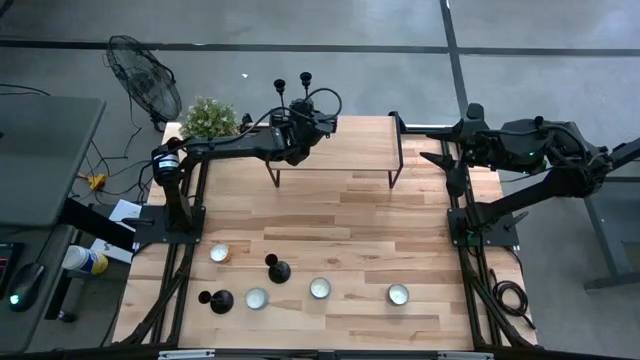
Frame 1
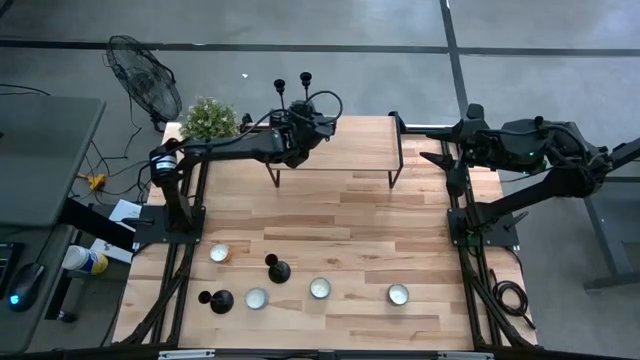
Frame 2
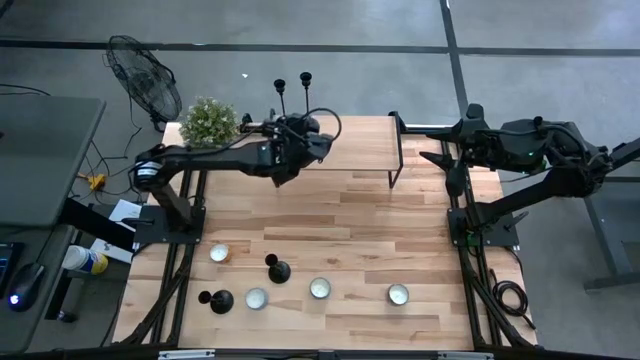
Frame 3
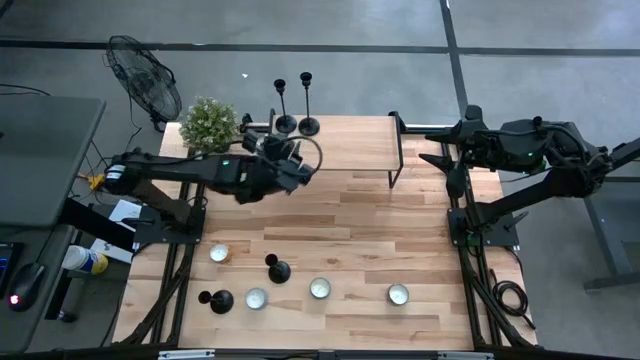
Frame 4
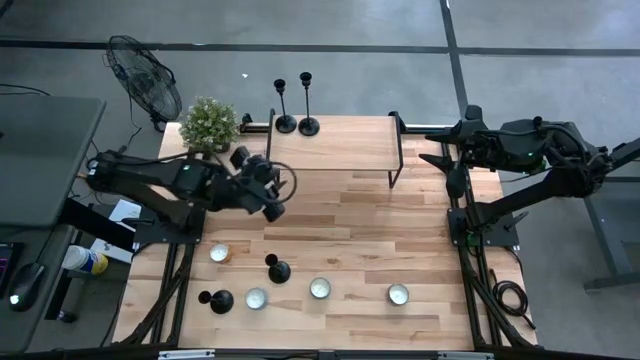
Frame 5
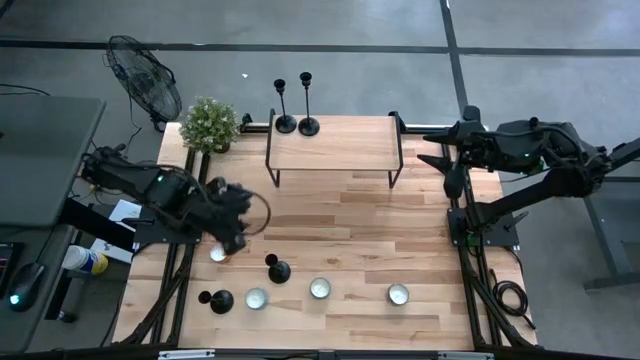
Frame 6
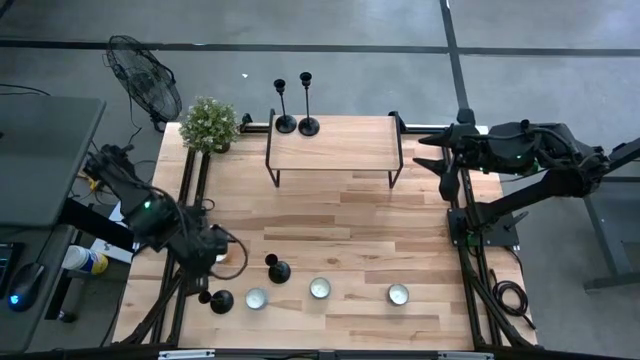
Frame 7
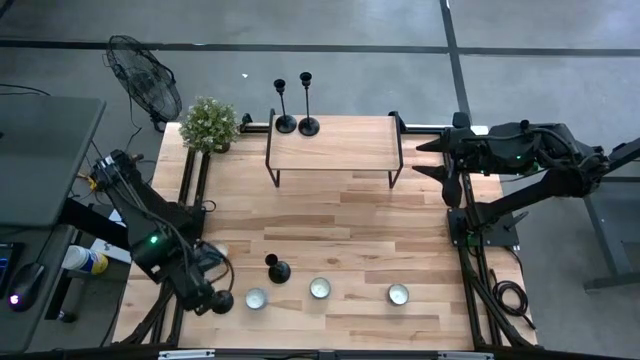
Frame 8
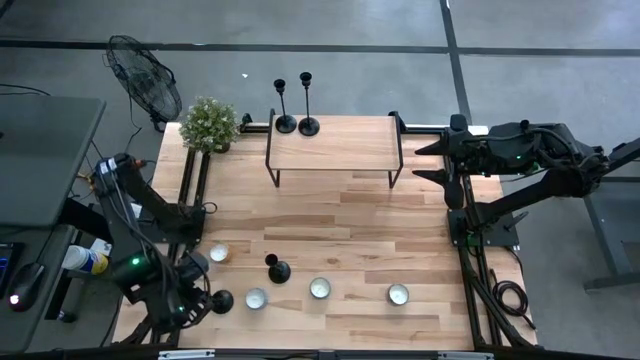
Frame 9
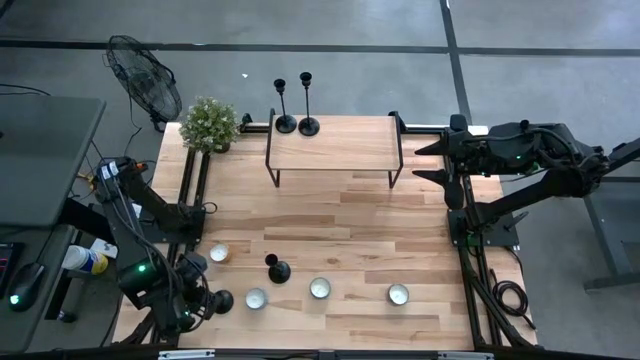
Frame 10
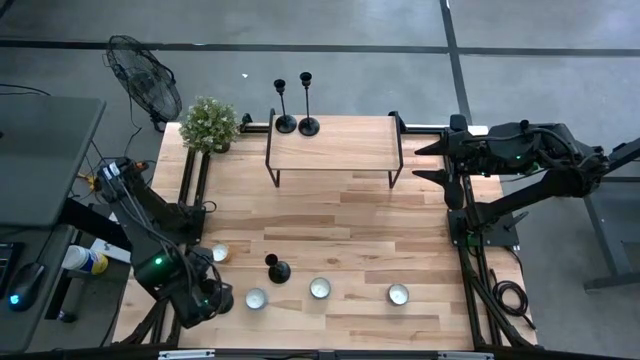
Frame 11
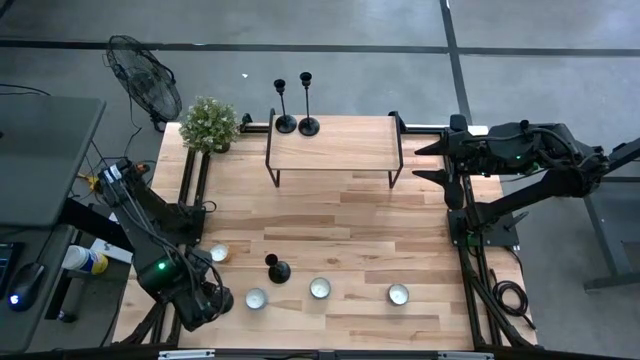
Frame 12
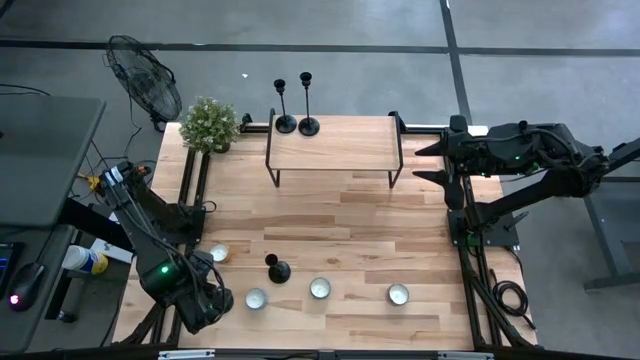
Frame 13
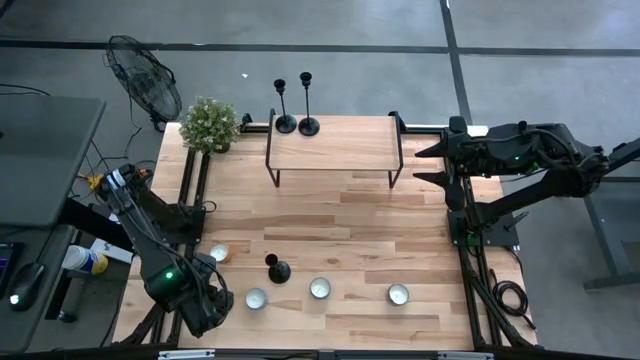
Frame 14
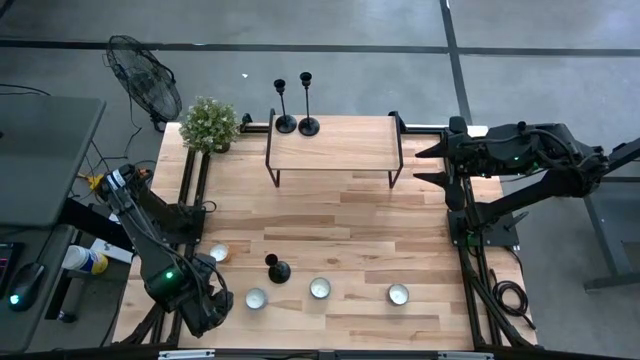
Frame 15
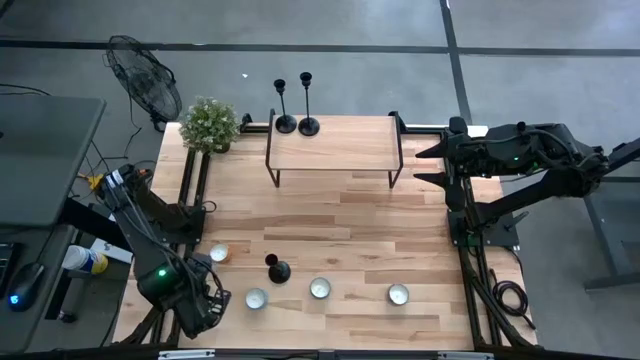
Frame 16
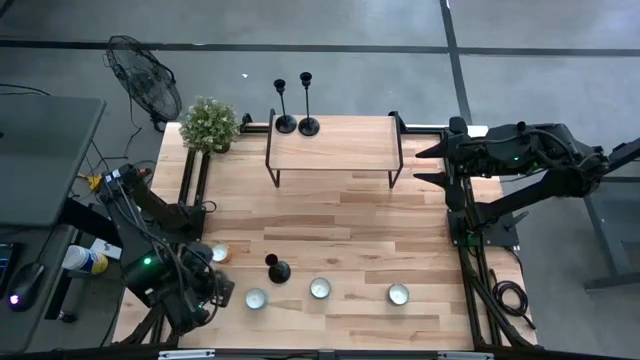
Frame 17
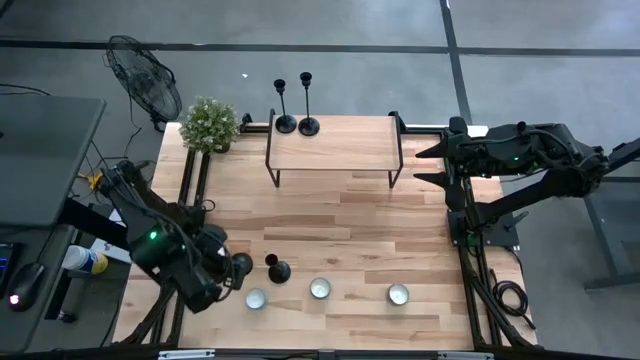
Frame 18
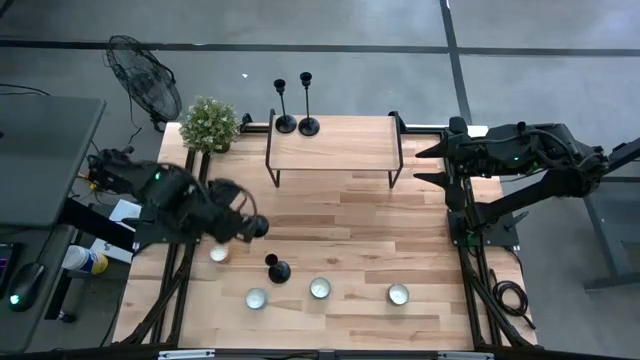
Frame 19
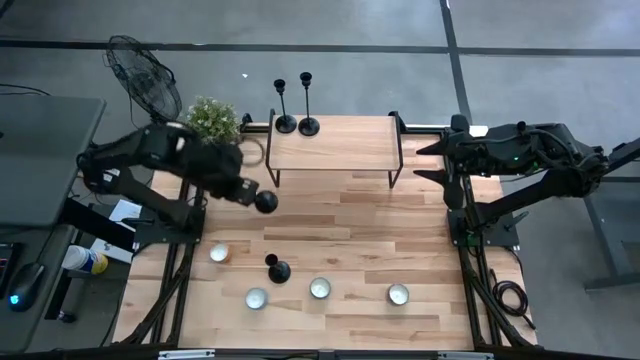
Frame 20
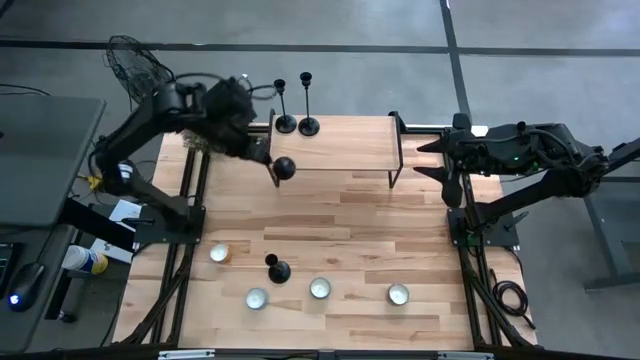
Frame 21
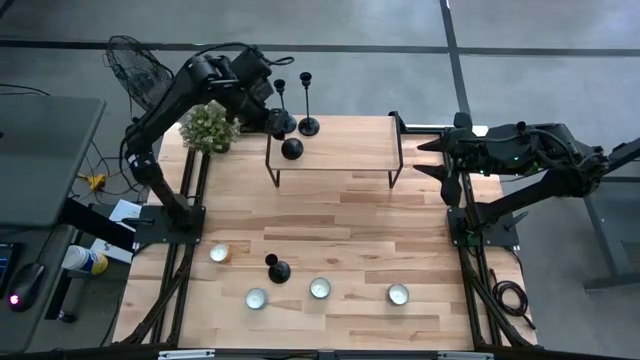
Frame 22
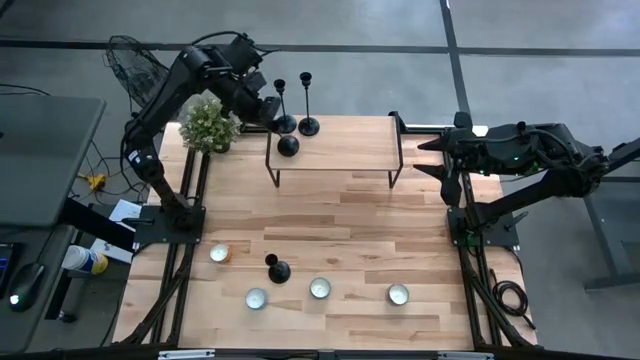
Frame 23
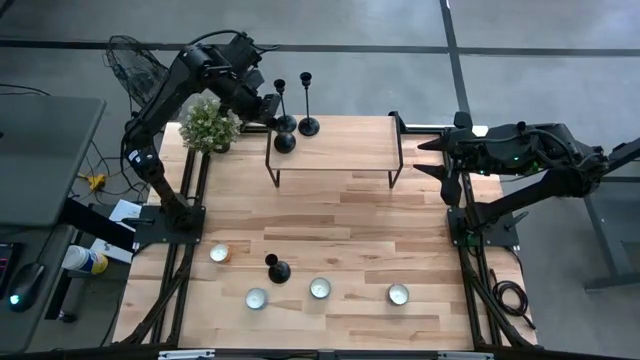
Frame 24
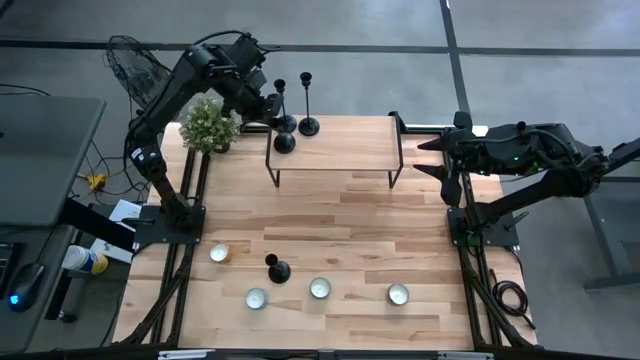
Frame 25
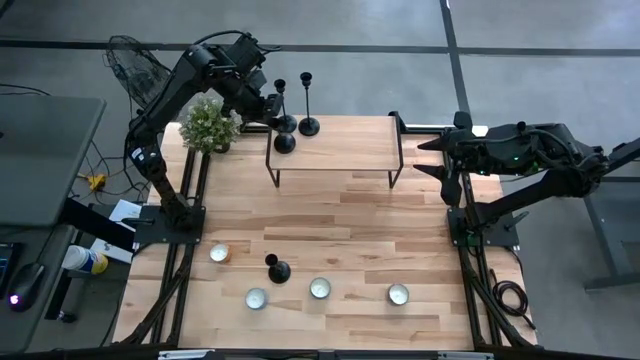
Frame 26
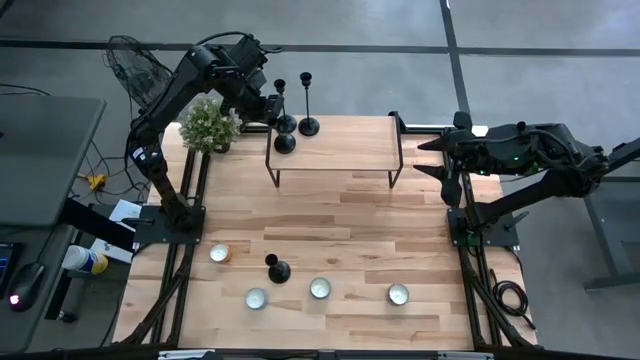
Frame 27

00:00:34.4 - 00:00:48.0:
Task: Pick & Place candle stick holders
Put the black candle holder on the shelf

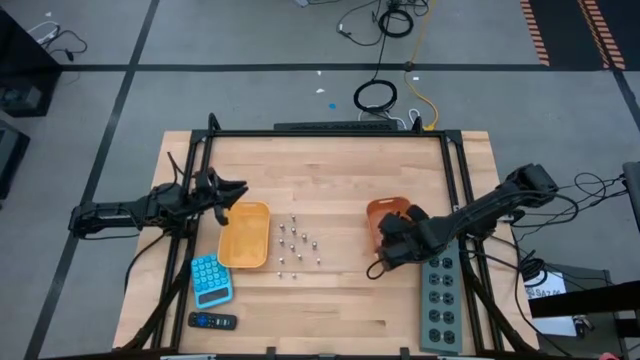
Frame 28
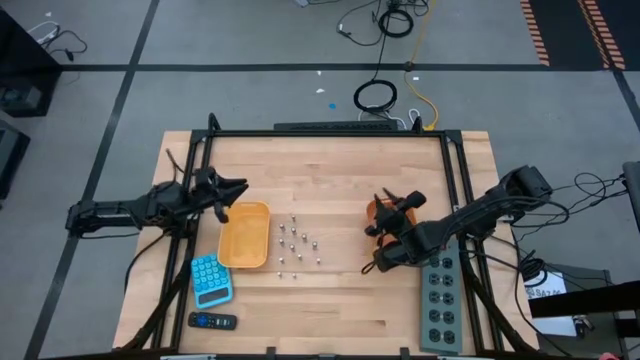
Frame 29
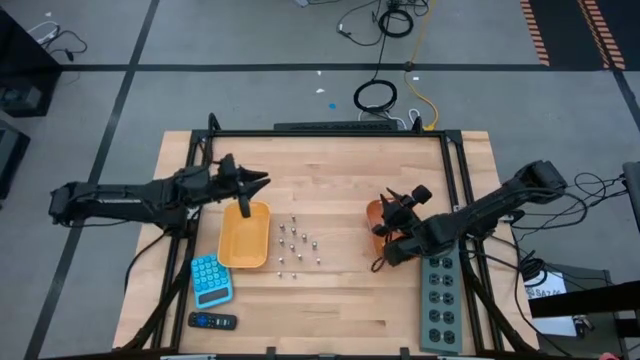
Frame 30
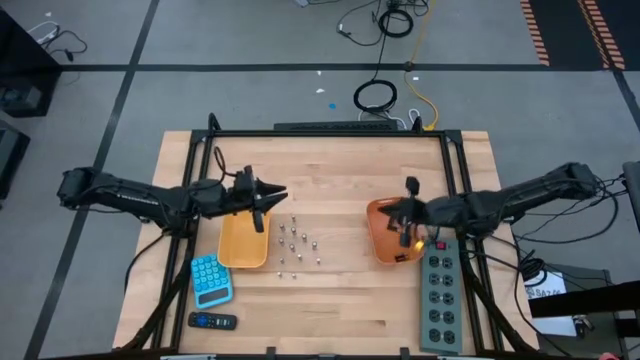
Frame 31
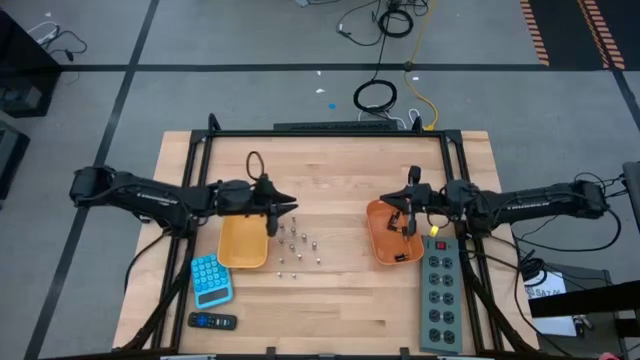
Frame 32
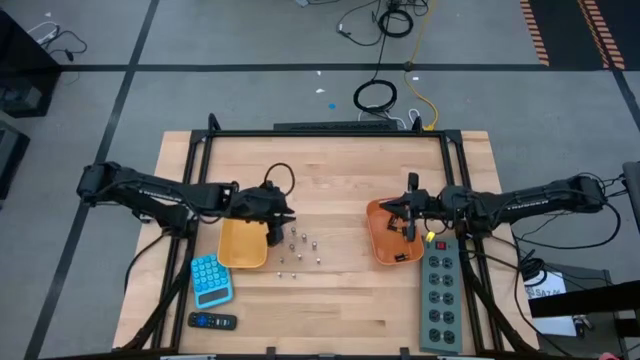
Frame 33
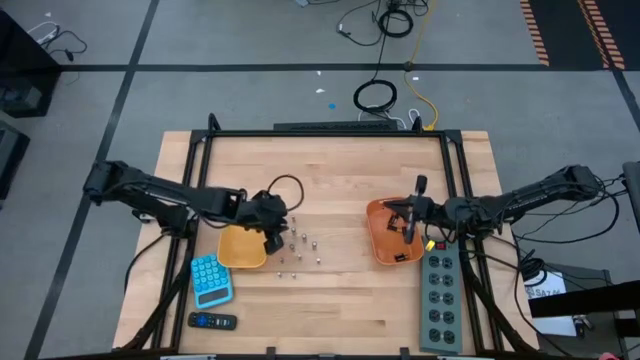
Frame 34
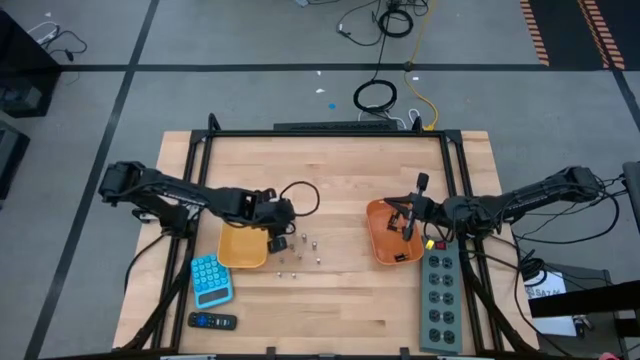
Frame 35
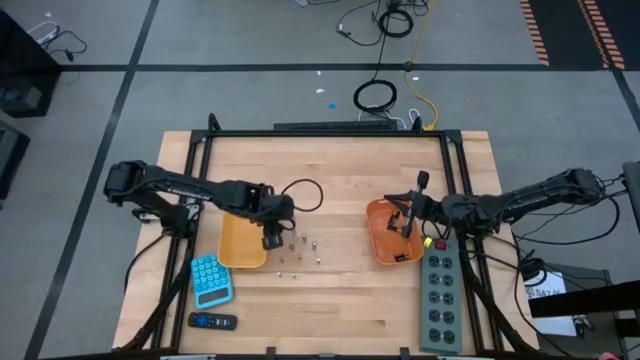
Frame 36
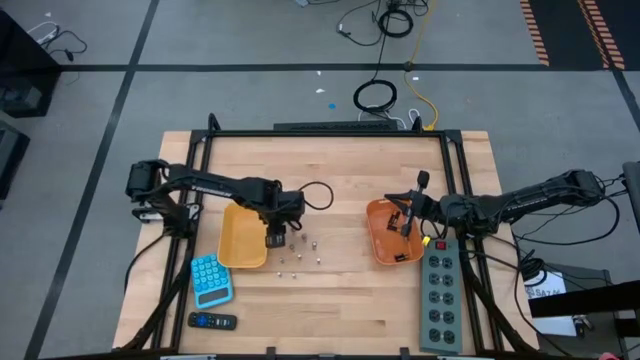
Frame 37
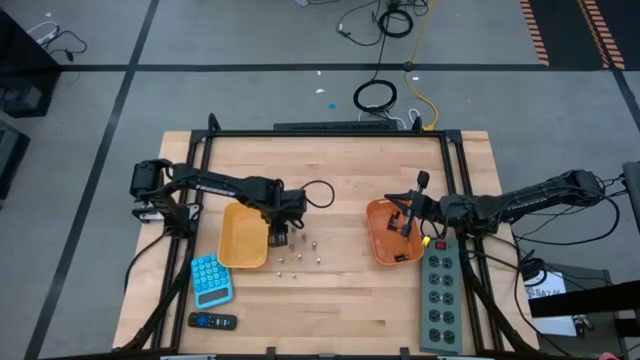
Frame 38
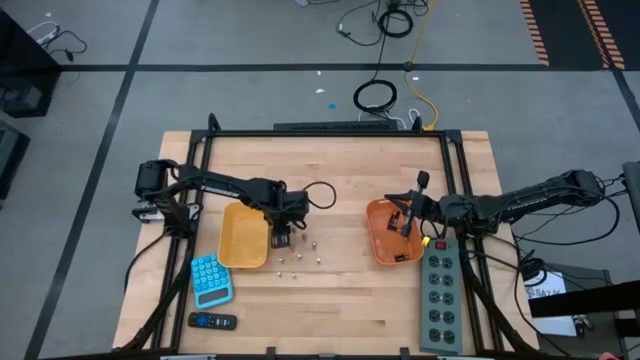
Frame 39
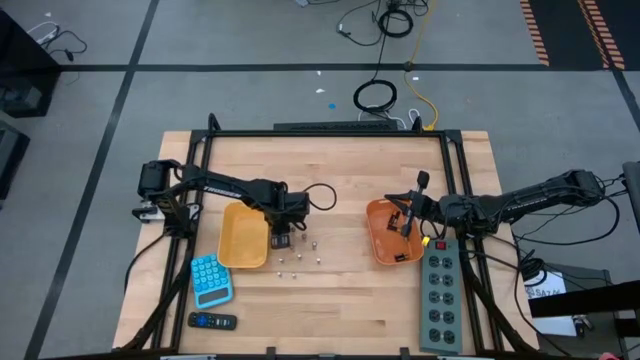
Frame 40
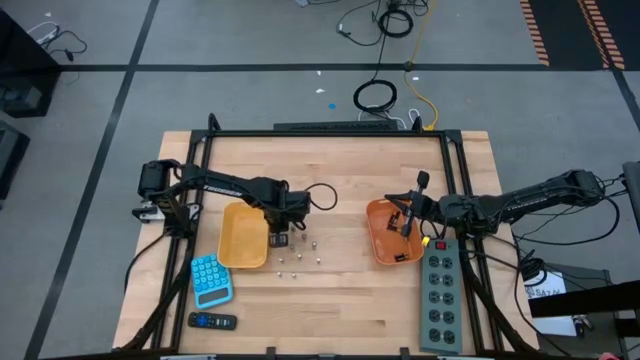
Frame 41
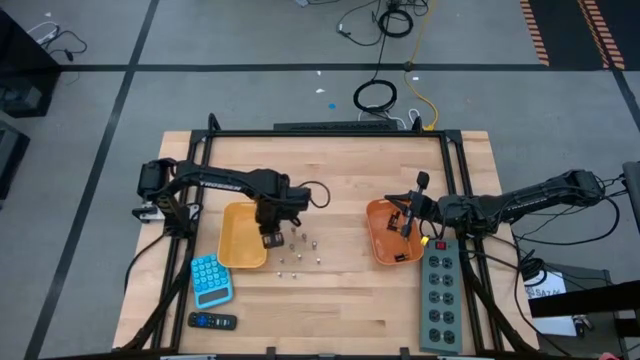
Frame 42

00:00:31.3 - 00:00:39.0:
Task: Sort batteries
Put the silver battery into the yellow bin

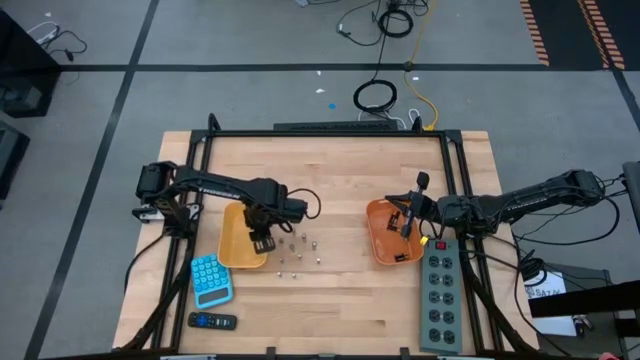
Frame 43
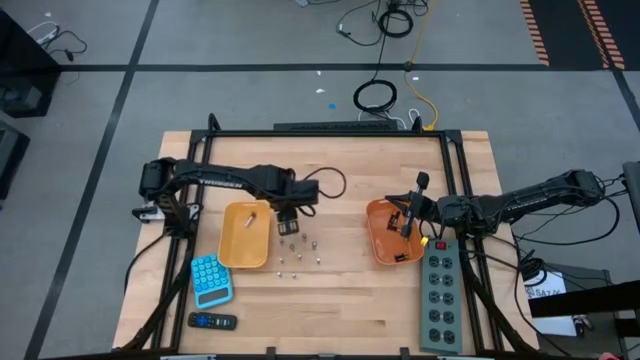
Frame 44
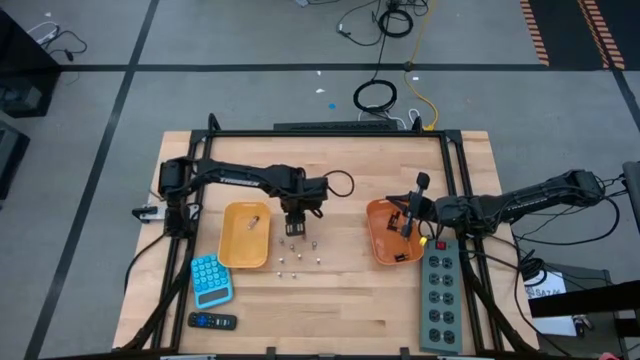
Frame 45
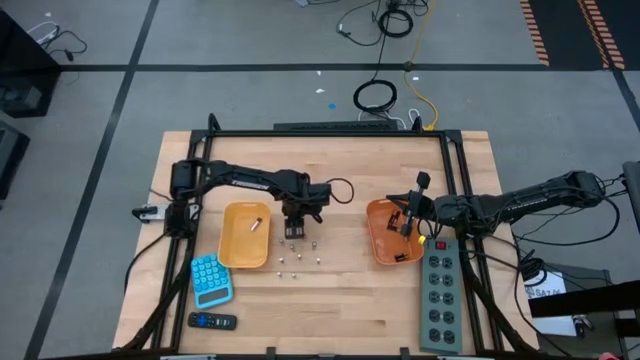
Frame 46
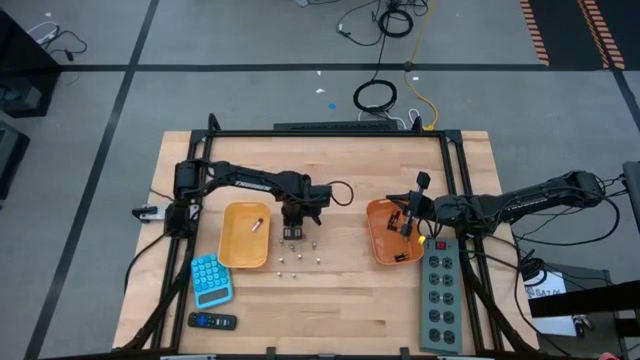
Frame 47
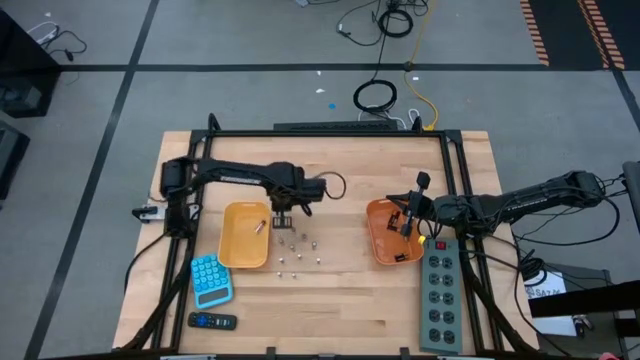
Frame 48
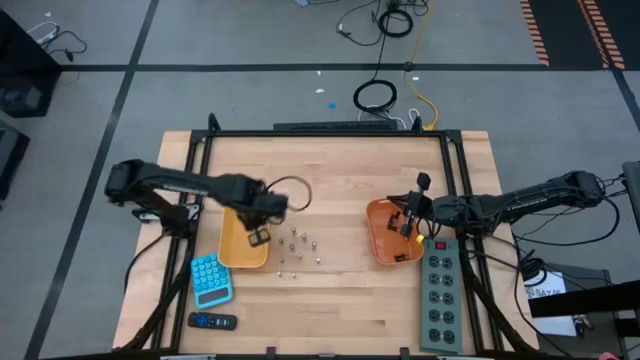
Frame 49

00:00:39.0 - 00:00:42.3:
Put the silver battery into the yellow bin
